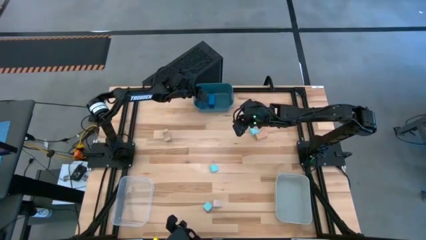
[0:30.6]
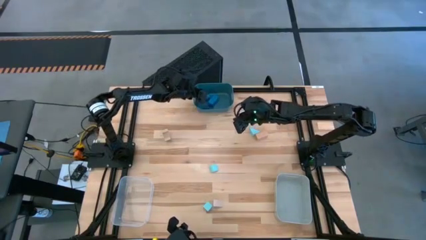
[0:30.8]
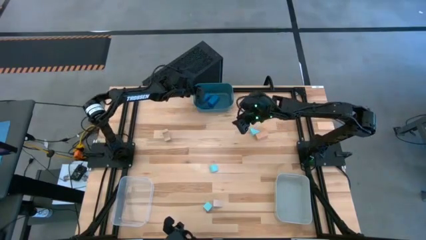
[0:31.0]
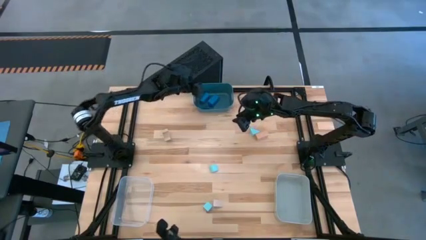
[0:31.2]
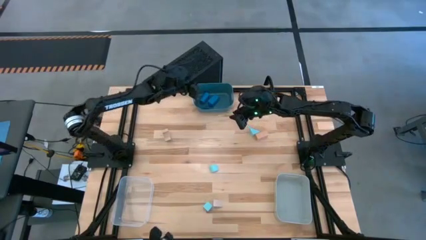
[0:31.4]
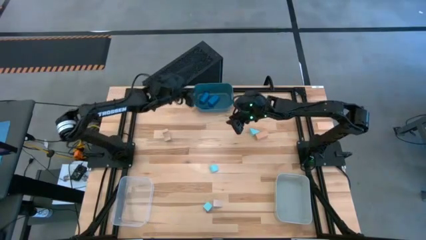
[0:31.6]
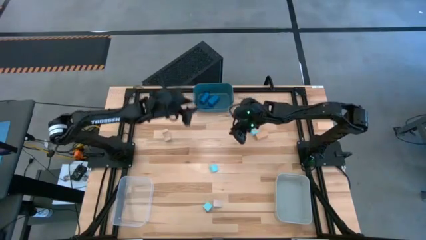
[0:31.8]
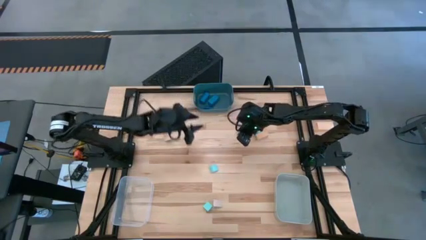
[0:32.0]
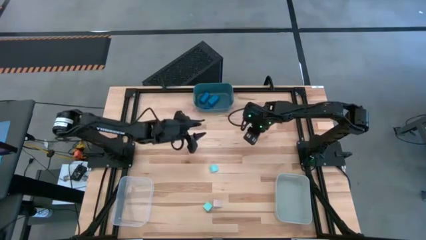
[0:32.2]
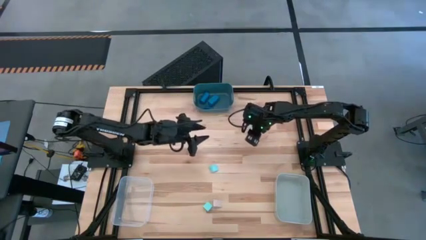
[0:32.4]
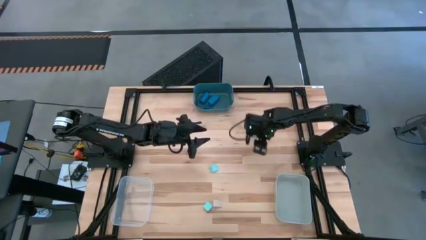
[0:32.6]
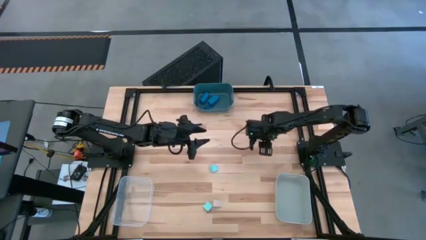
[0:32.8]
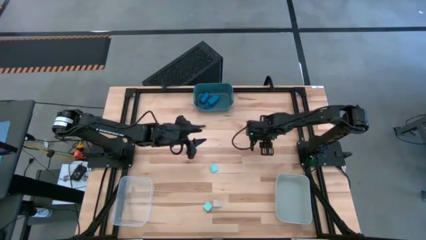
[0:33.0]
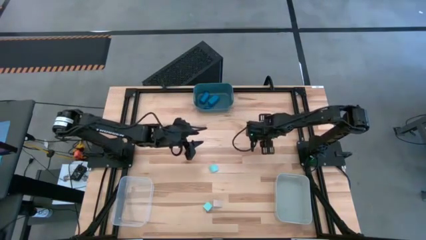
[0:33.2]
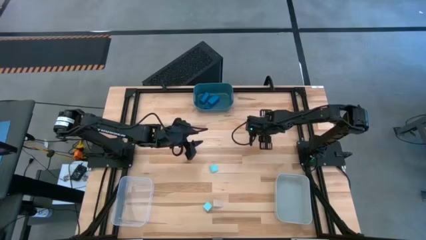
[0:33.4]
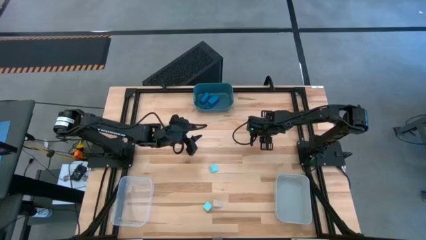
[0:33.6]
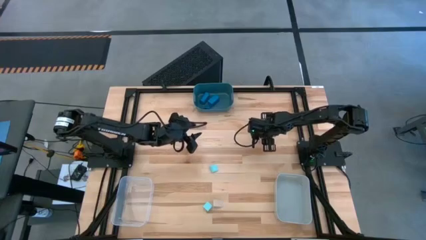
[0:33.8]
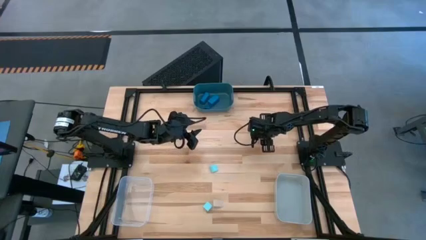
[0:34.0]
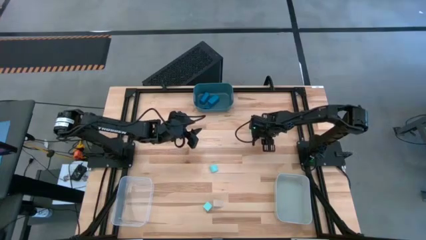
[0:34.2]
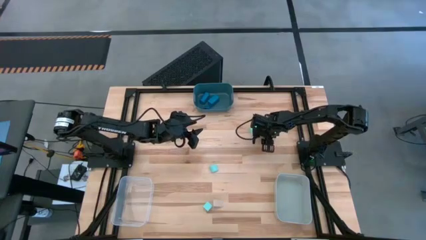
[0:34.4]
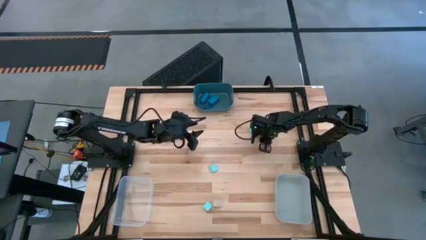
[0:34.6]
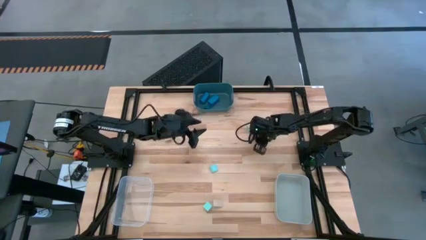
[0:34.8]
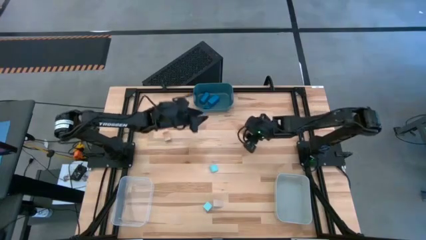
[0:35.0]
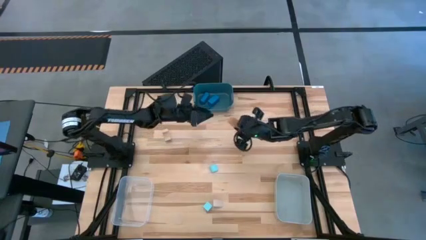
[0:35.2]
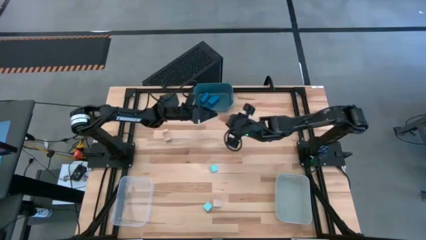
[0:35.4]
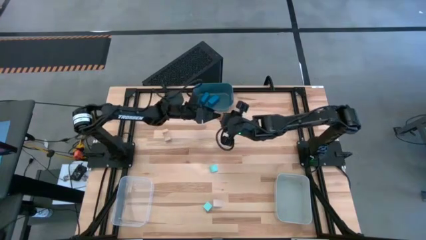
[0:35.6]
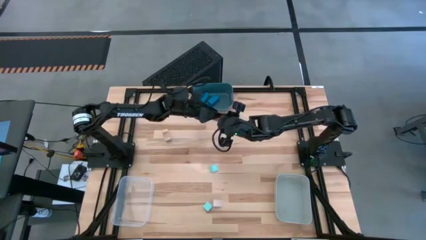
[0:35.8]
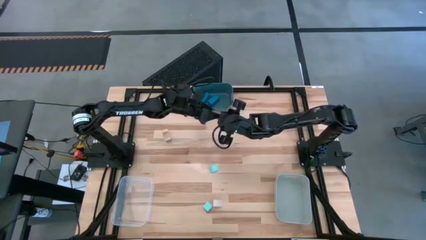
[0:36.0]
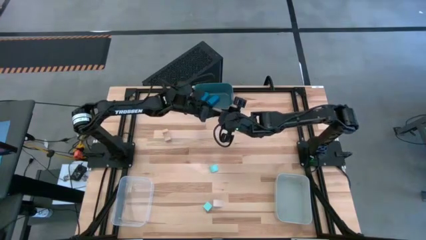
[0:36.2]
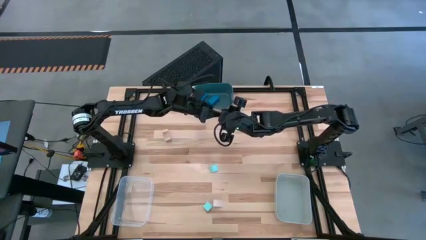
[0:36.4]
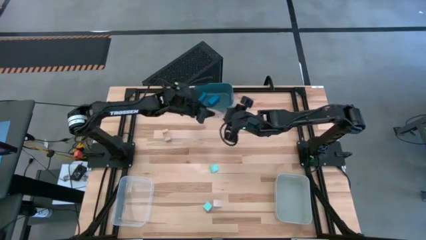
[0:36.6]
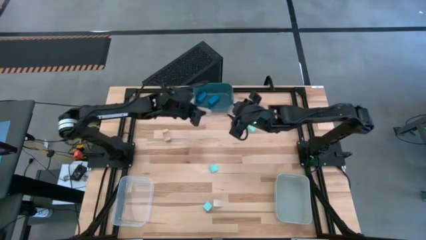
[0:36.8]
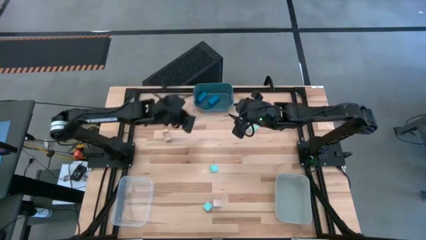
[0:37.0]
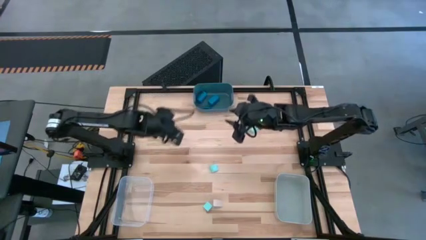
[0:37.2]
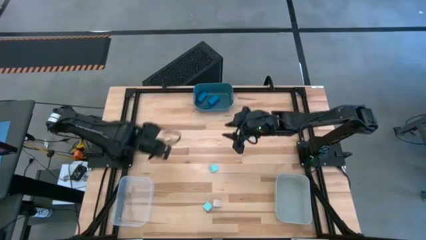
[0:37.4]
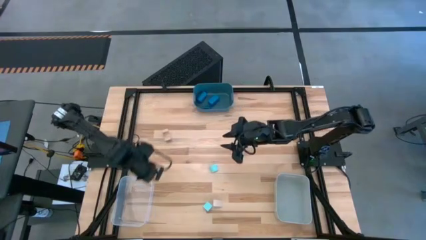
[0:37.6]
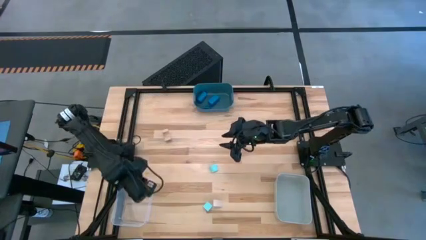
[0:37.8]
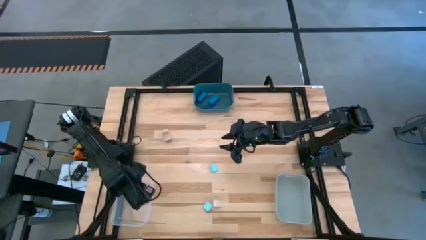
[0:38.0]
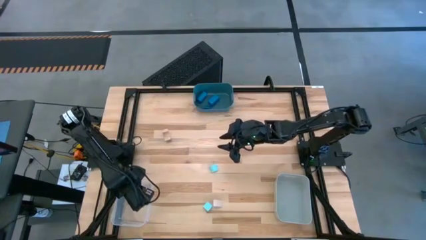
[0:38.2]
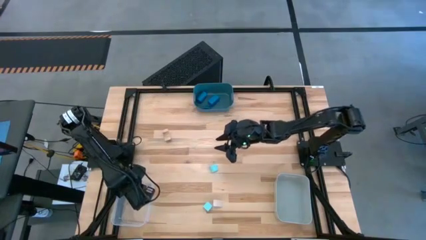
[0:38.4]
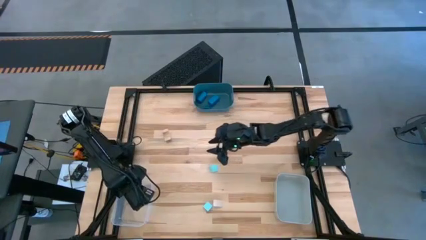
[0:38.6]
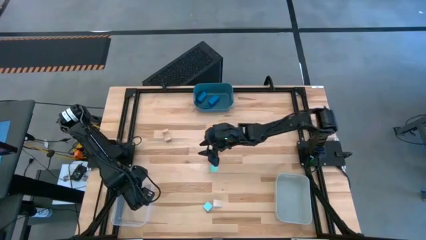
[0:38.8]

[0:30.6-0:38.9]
Task: Sort & place blocks by color
Put the top right brown block into the transparent bin

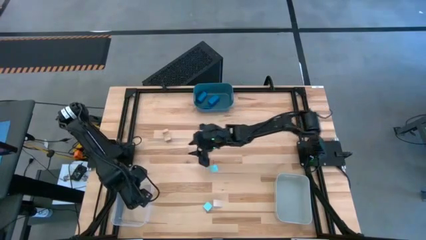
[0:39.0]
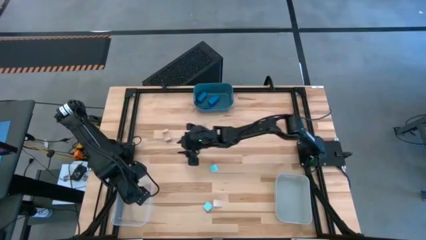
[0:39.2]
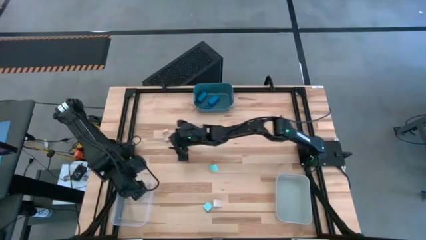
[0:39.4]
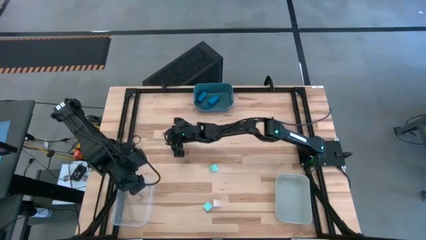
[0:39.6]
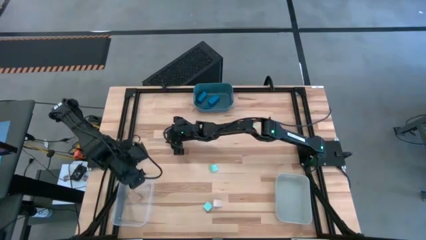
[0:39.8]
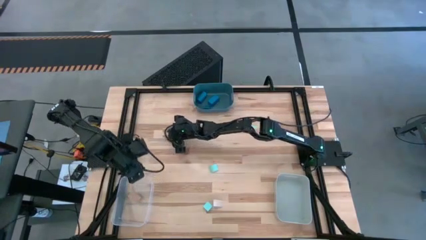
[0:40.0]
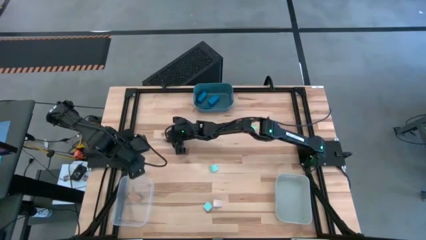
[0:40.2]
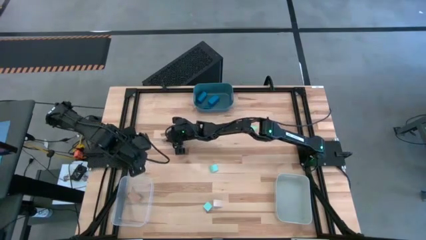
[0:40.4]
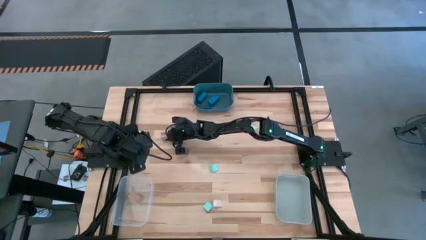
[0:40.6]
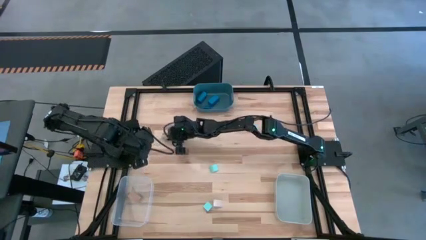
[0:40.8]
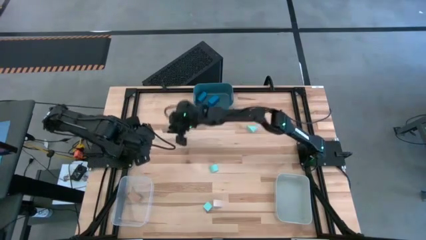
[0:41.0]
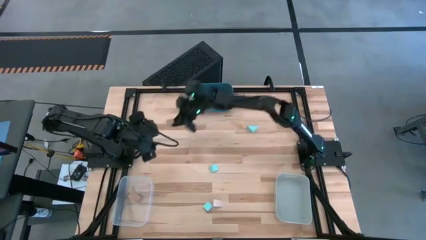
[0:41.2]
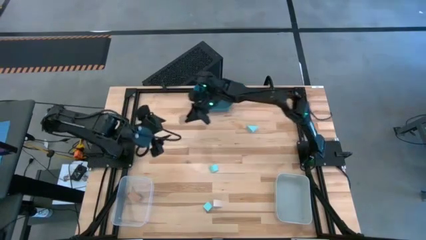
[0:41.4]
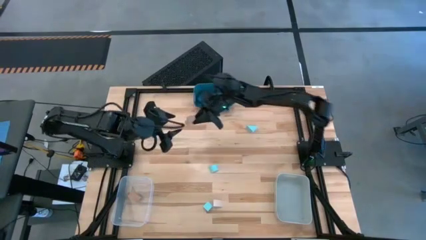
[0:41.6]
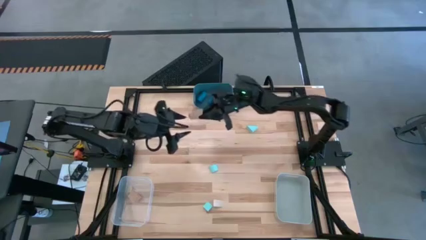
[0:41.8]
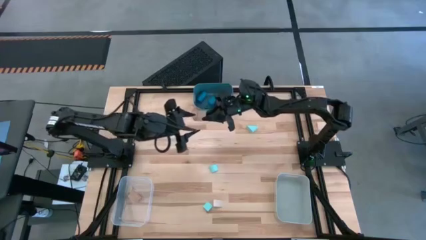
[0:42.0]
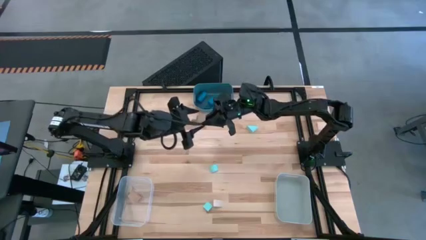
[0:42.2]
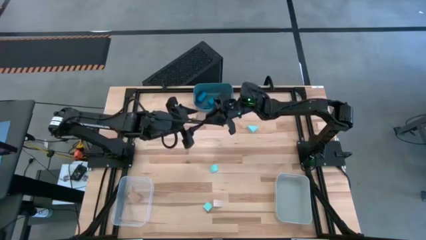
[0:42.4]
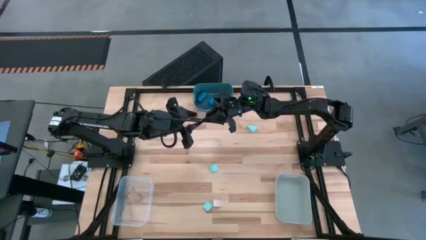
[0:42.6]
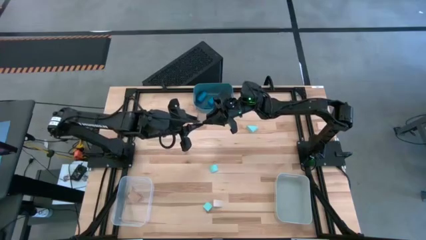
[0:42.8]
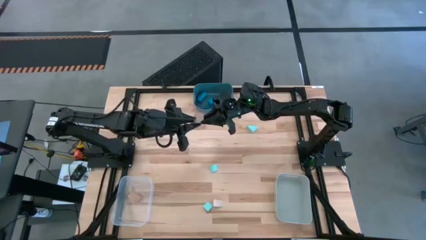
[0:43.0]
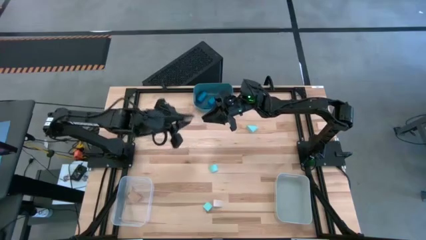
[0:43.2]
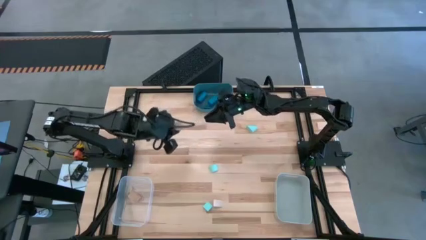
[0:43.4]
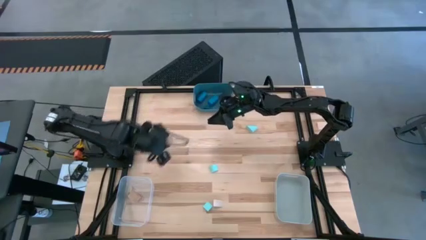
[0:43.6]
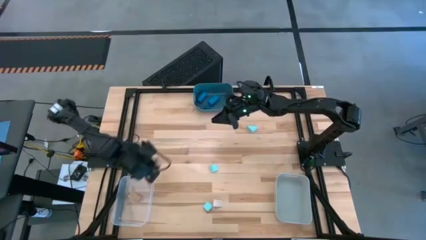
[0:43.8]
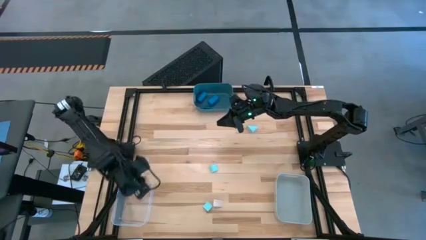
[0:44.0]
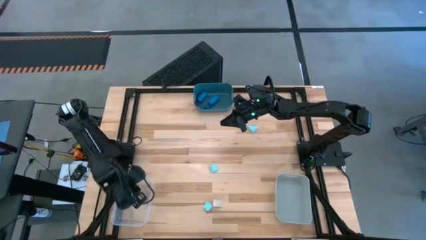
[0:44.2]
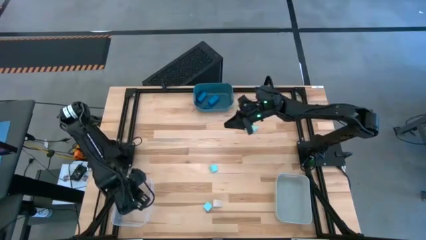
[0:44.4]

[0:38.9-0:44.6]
Put the top brown block into the transparent bin
